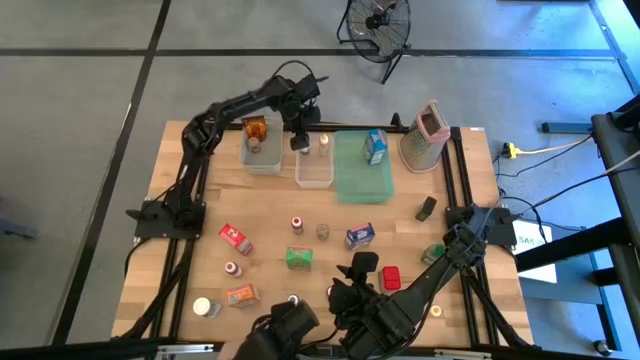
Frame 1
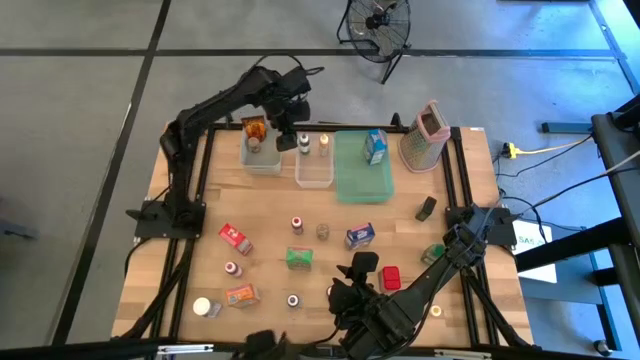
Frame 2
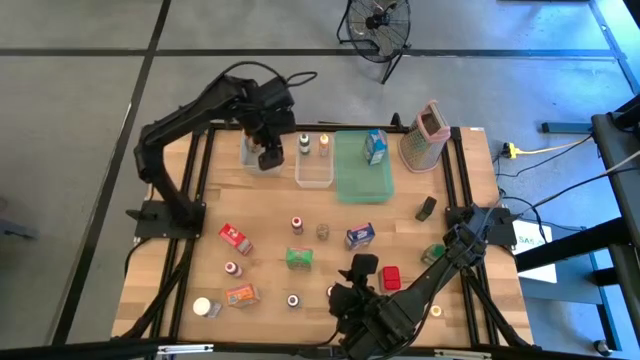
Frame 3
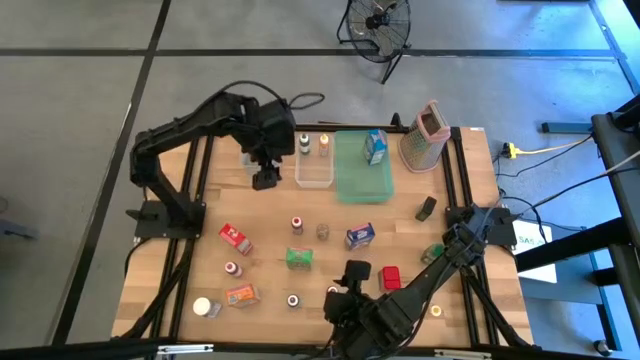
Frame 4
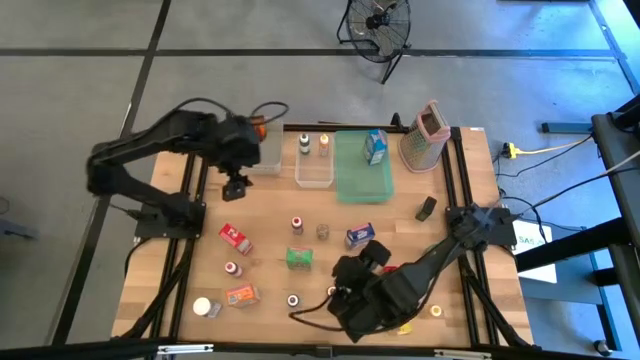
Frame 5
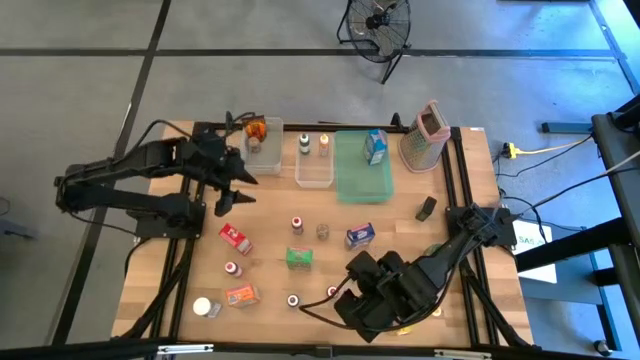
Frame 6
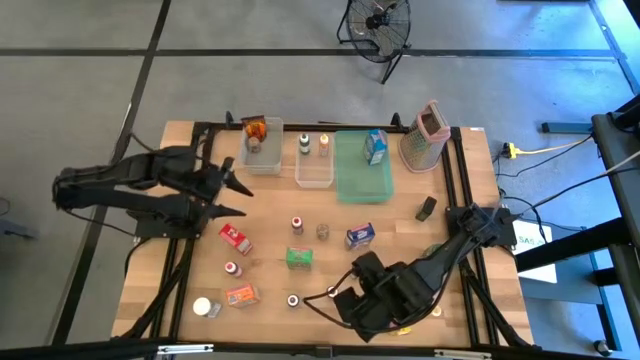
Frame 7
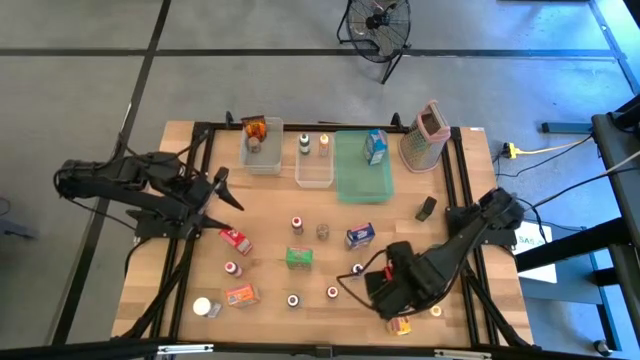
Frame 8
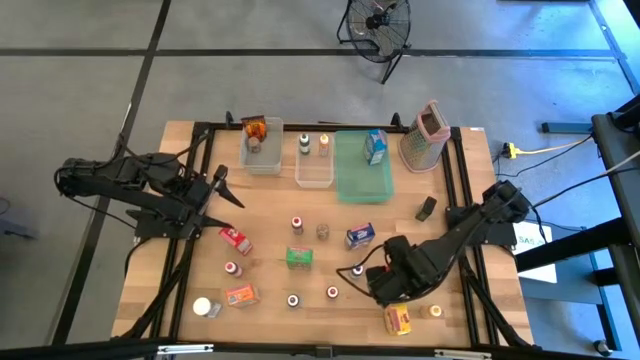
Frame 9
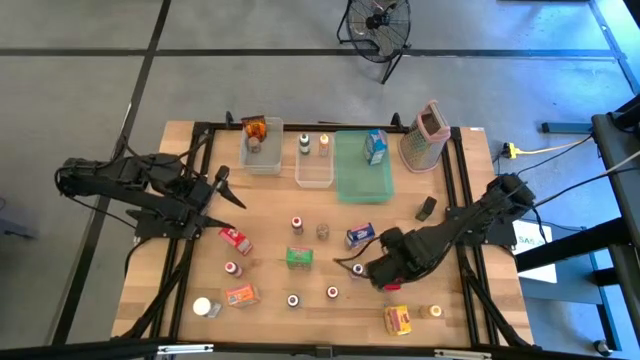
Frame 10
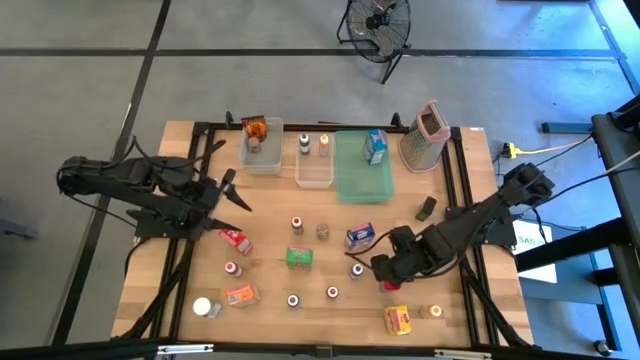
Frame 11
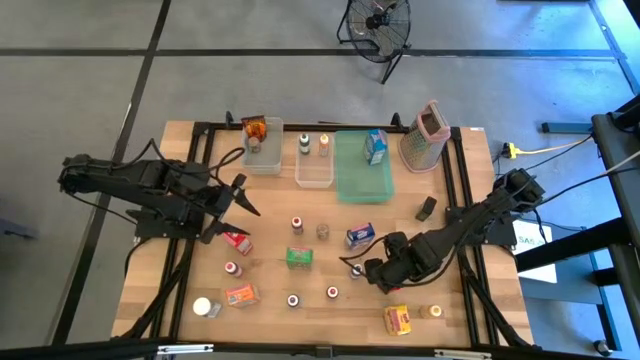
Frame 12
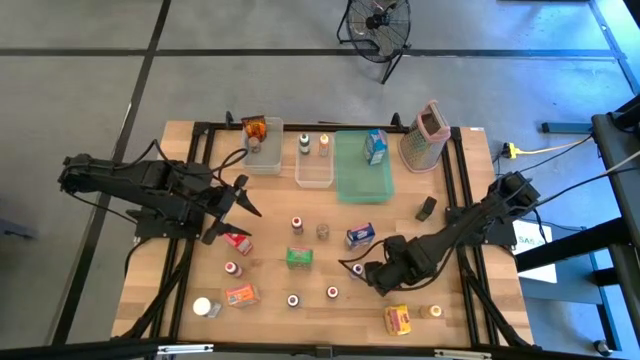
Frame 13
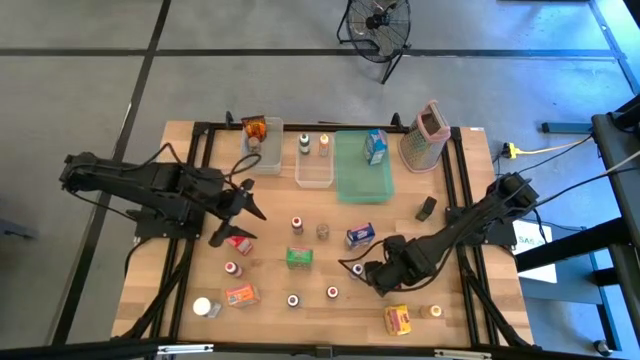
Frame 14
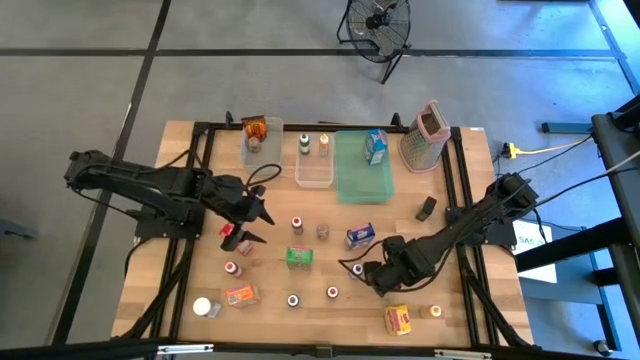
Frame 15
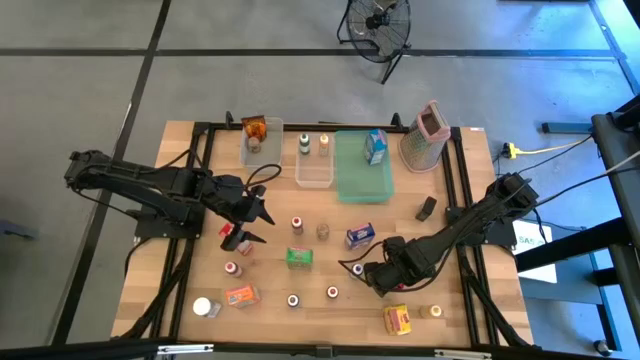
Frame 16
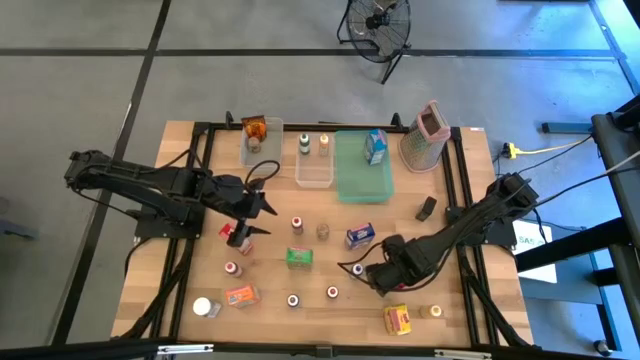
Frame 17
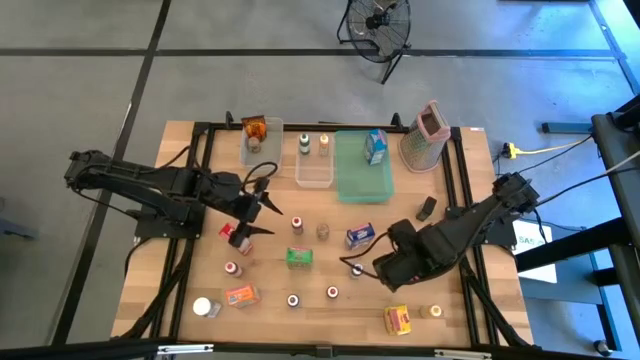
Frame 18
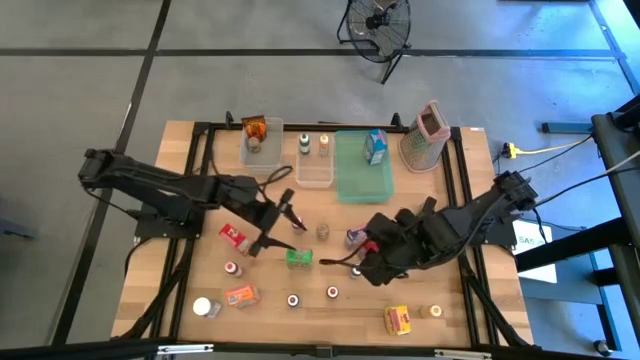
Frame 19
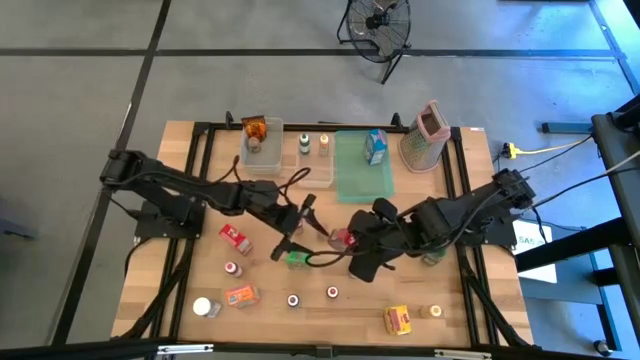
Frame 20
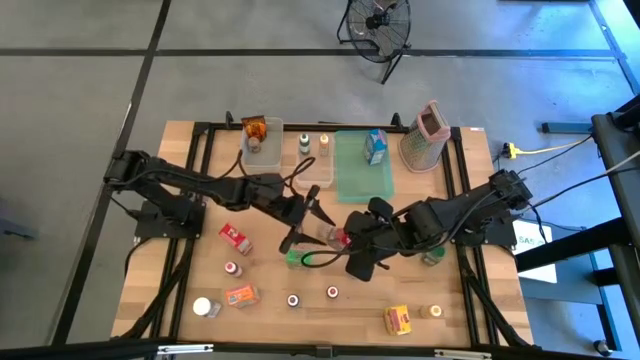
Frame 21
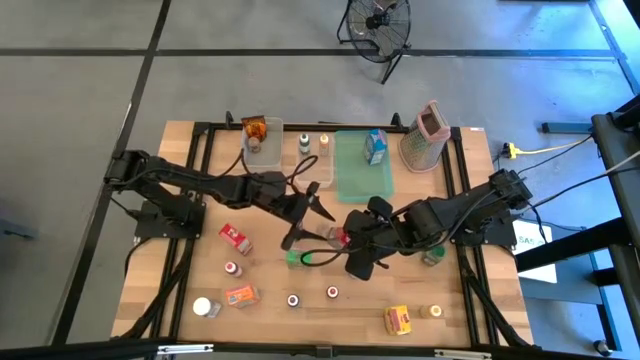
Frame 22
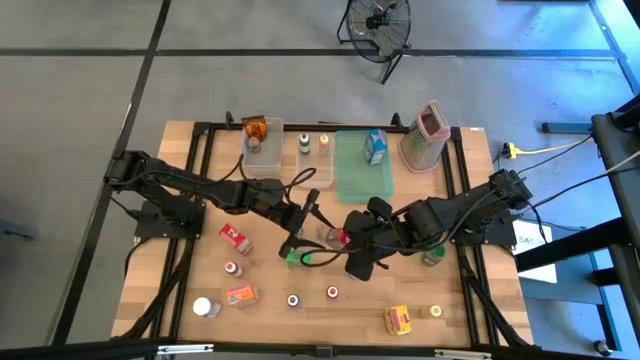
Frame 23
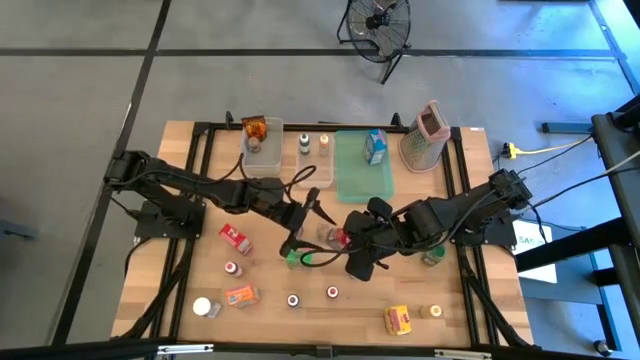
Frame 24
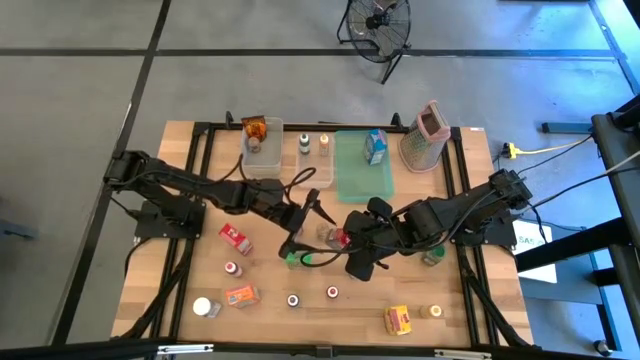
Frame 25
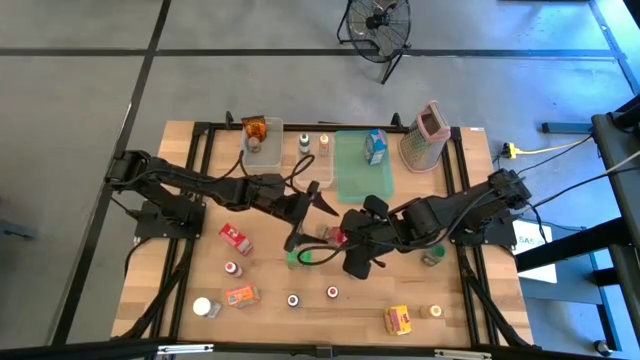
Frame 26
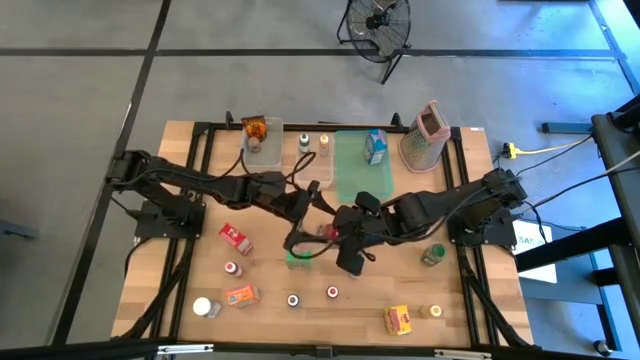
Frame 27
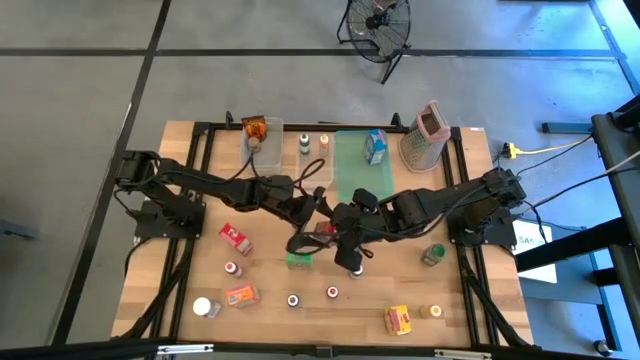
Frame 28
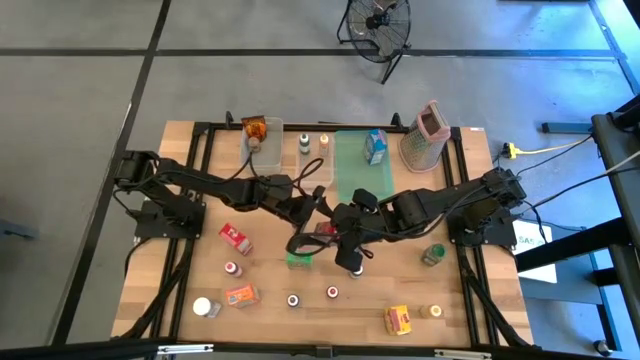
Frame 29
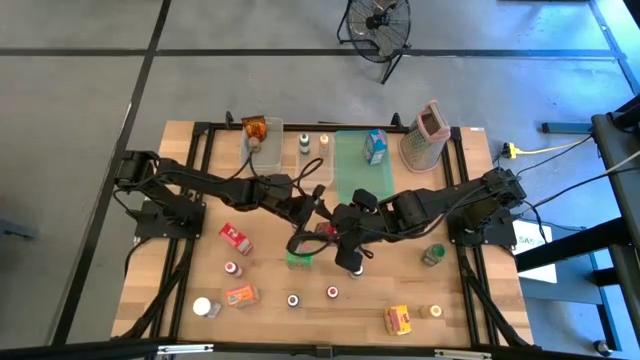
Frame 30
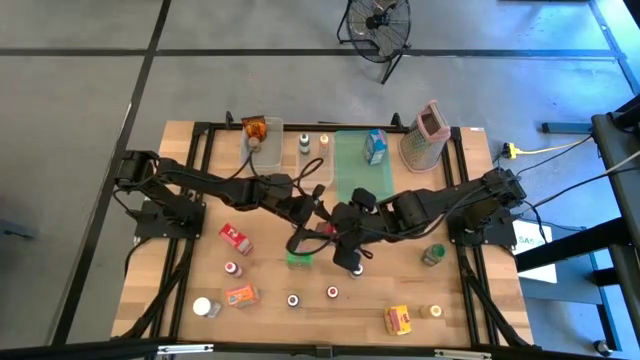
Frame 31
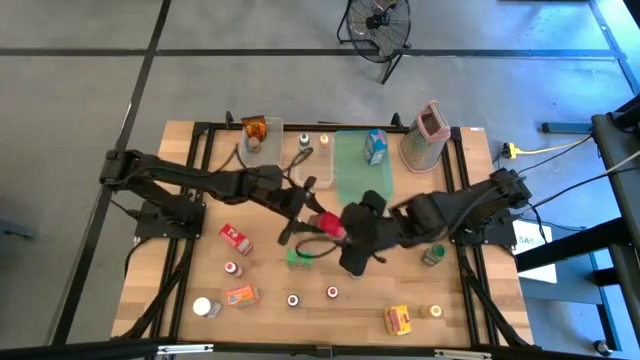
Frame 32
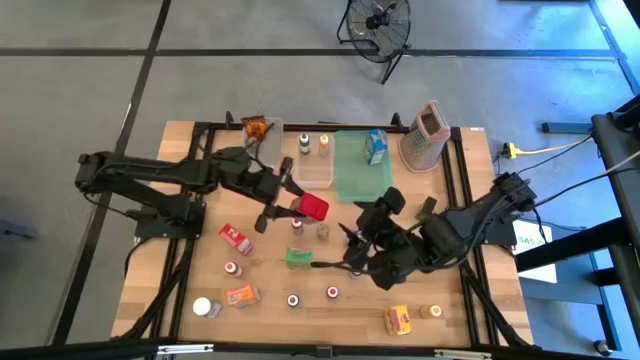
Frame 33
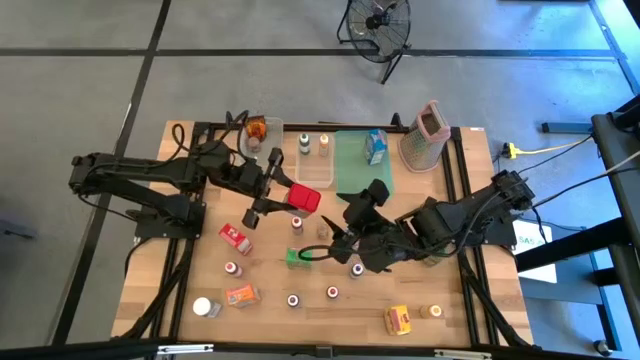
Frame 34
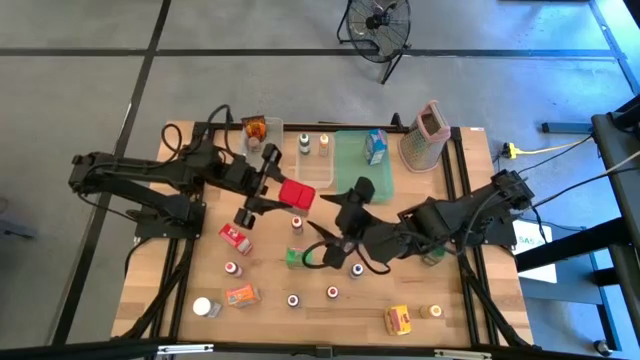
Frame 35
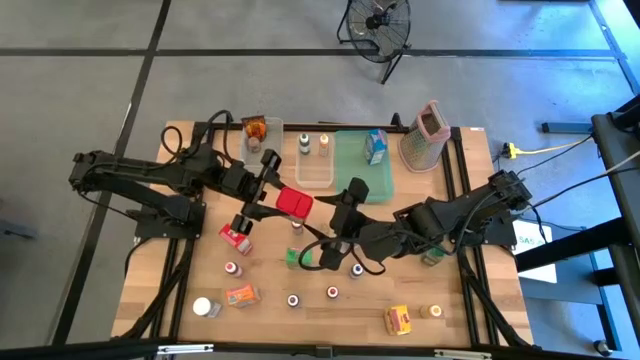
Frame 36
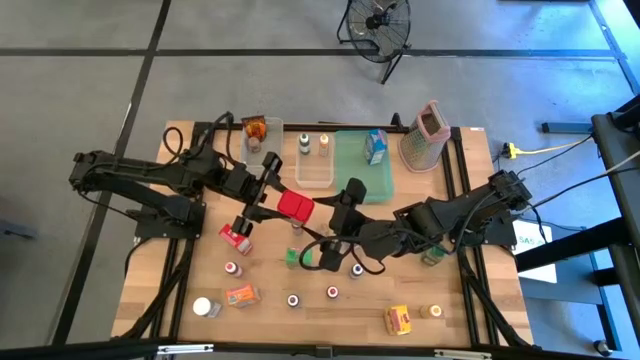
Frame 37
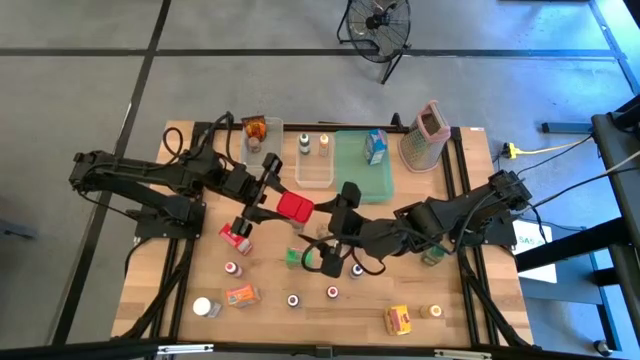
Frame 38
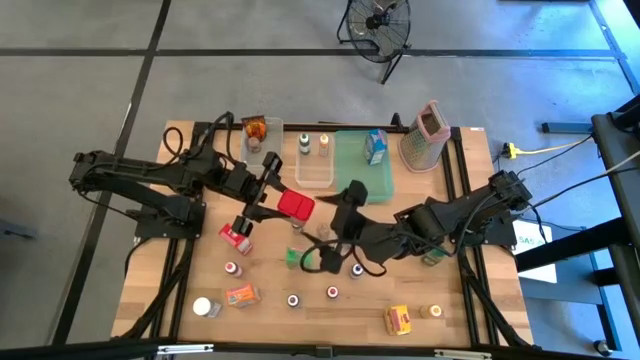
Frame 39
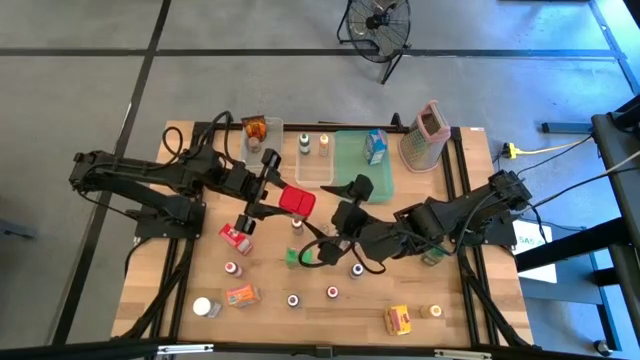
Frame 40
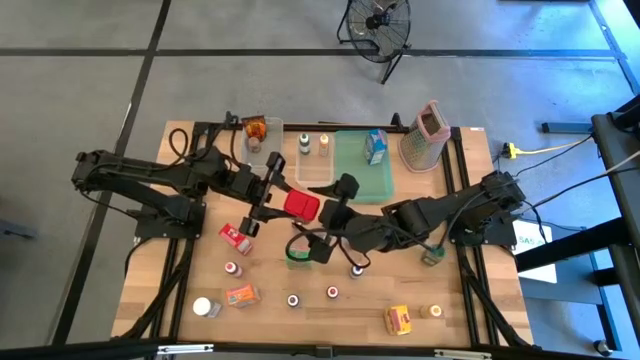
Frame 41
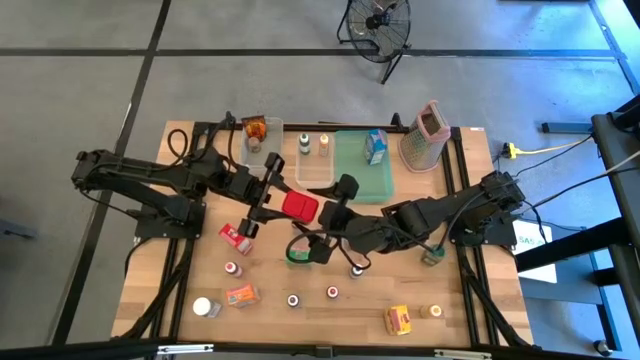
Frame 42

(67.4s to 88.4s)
Task: Pick & Place Kitchen Items
Put the red seasoning can into the gray bin
